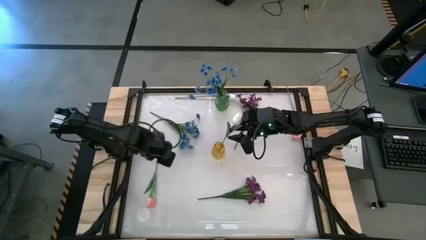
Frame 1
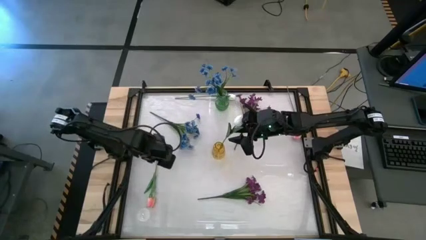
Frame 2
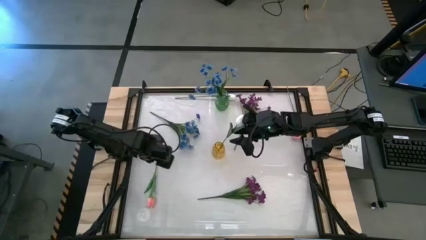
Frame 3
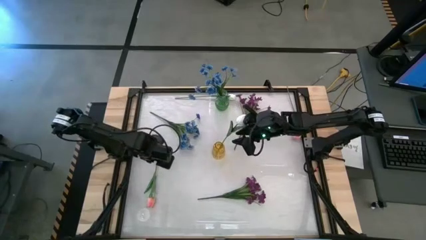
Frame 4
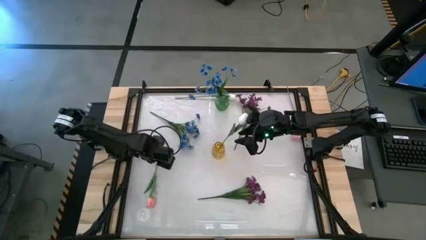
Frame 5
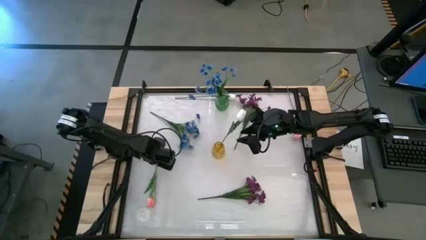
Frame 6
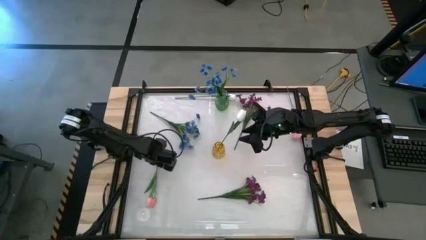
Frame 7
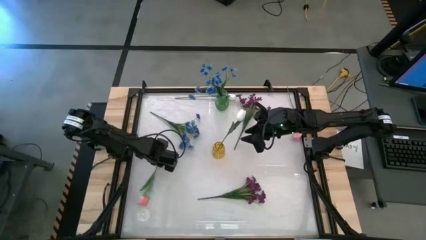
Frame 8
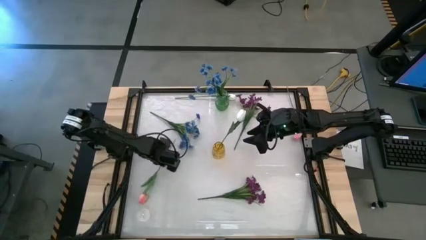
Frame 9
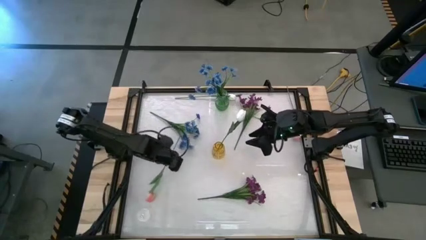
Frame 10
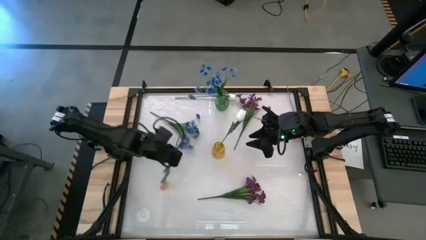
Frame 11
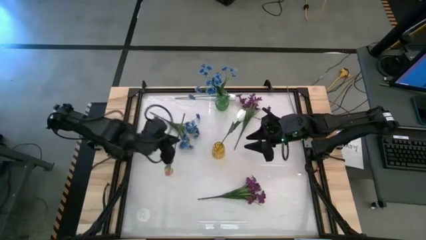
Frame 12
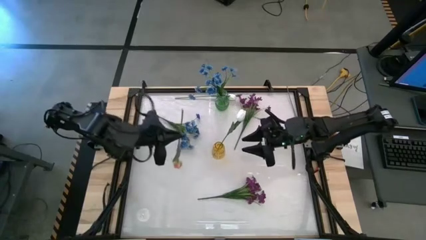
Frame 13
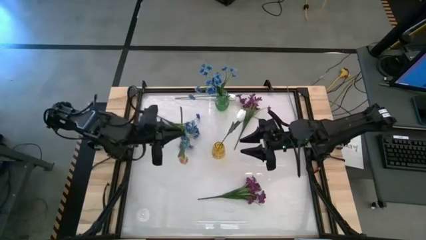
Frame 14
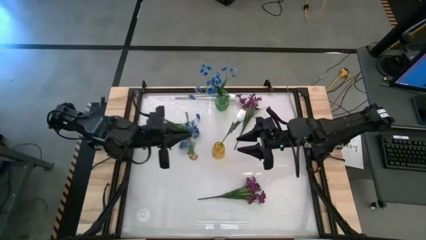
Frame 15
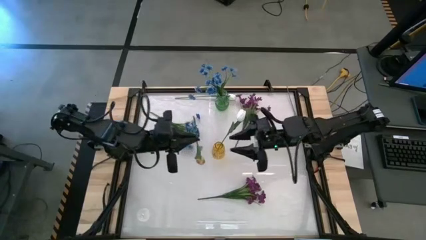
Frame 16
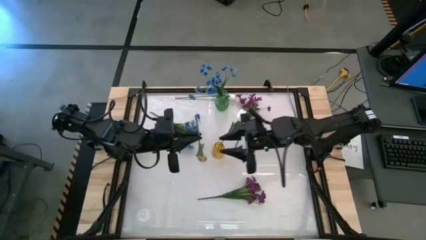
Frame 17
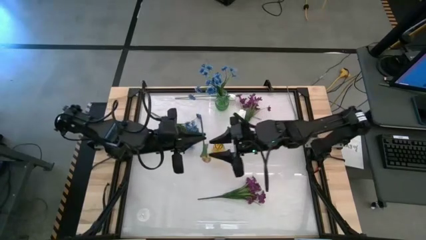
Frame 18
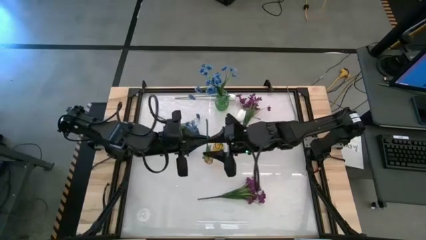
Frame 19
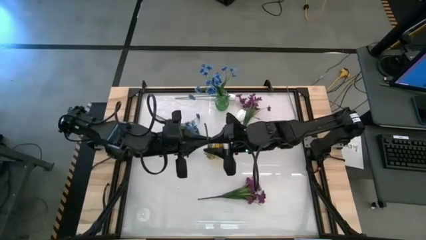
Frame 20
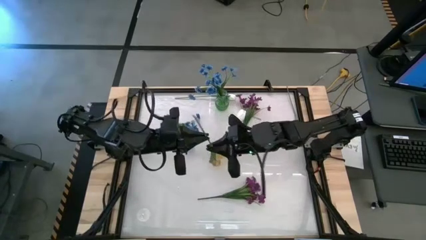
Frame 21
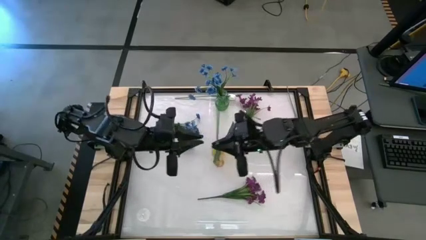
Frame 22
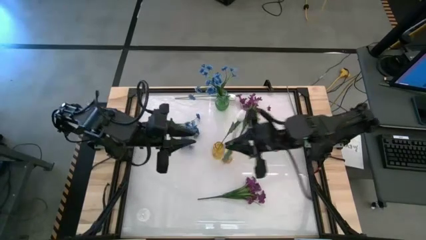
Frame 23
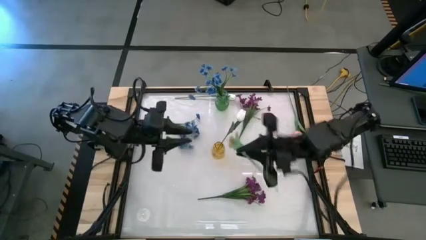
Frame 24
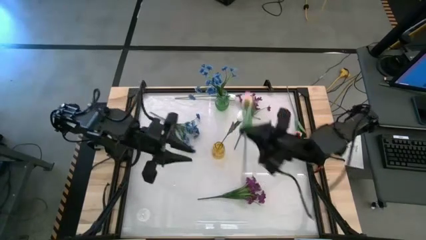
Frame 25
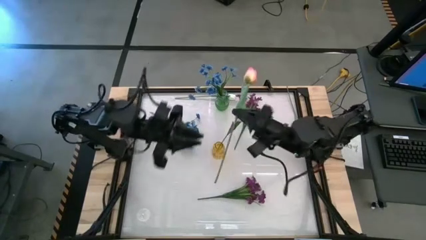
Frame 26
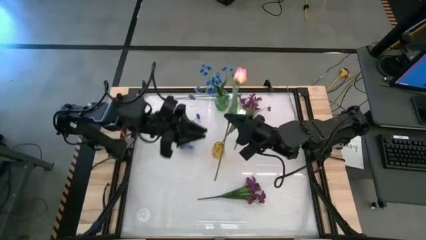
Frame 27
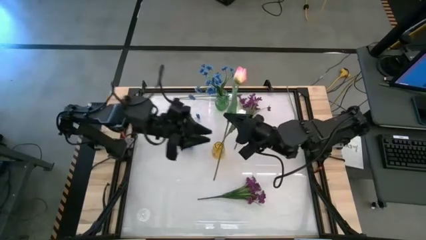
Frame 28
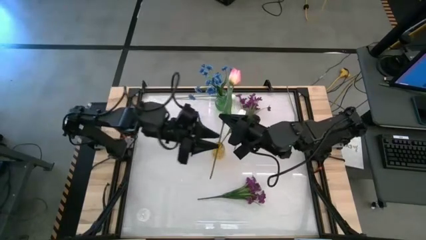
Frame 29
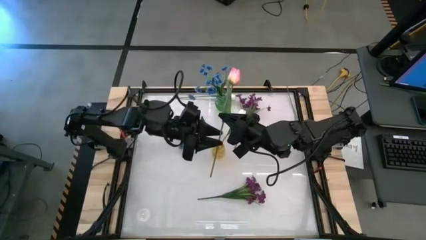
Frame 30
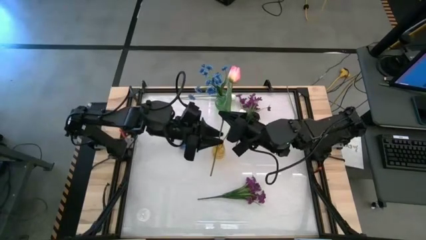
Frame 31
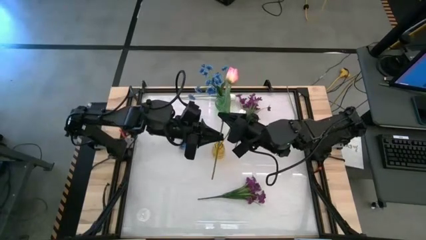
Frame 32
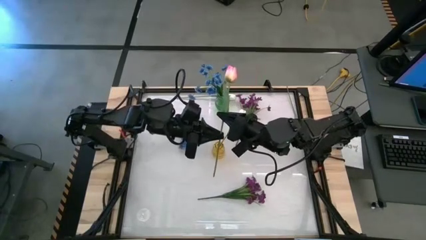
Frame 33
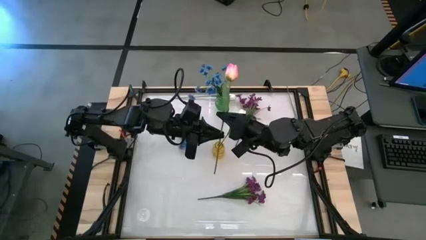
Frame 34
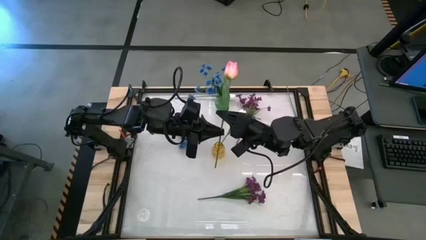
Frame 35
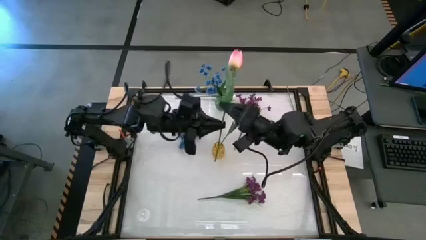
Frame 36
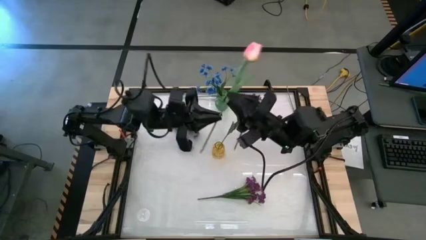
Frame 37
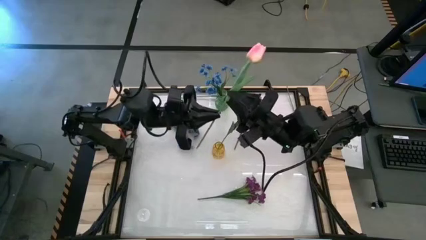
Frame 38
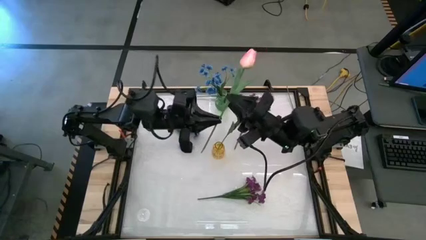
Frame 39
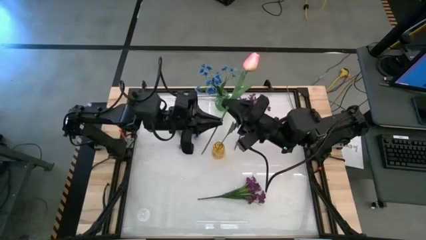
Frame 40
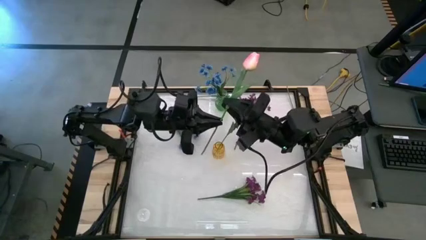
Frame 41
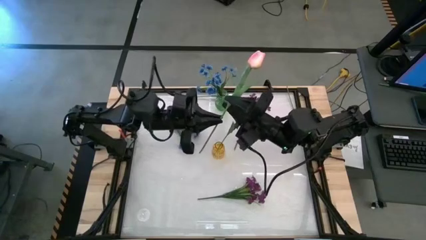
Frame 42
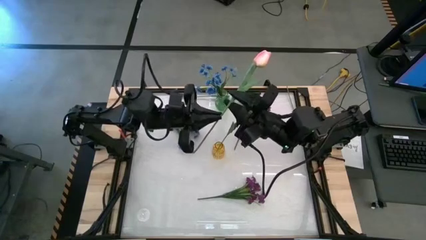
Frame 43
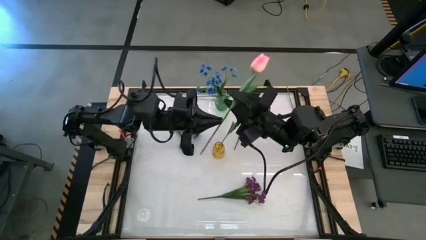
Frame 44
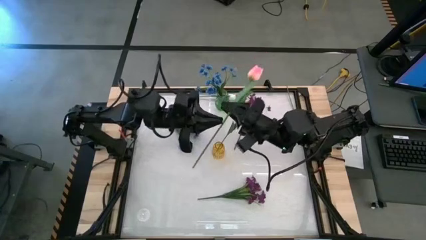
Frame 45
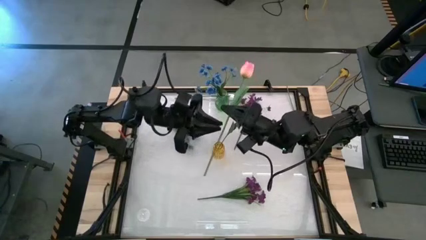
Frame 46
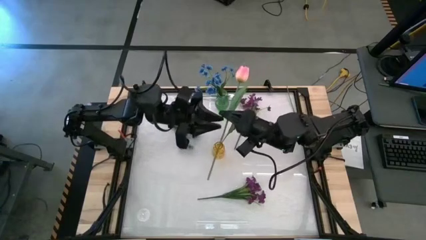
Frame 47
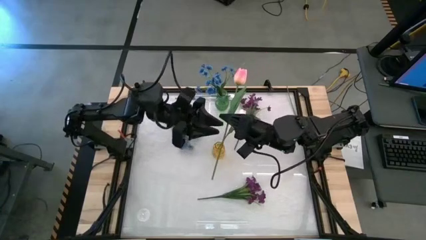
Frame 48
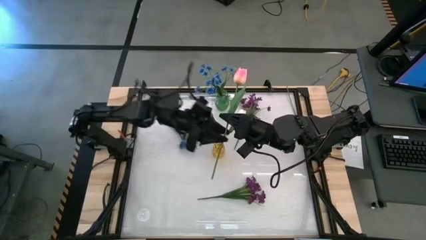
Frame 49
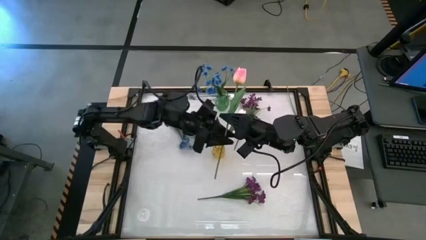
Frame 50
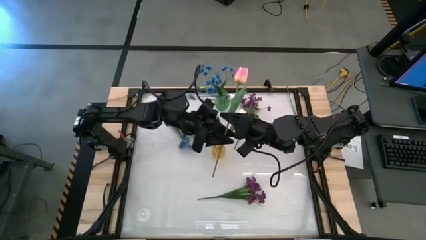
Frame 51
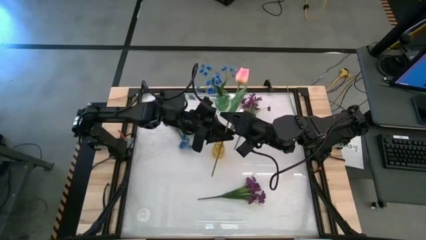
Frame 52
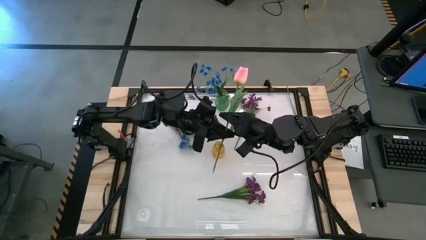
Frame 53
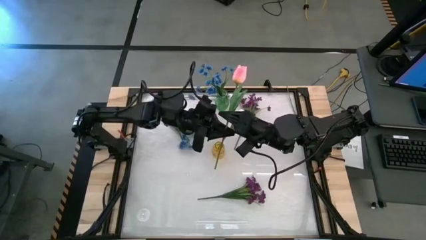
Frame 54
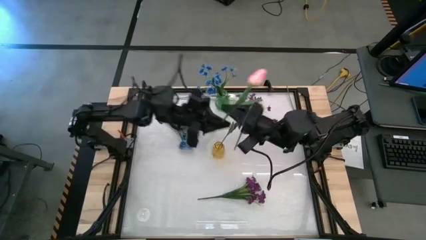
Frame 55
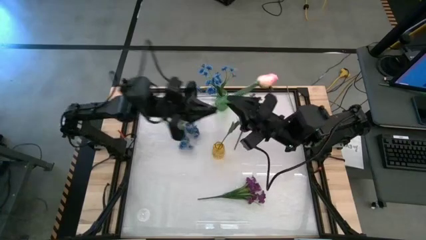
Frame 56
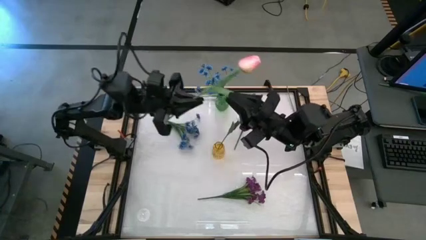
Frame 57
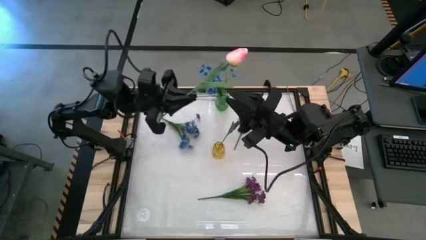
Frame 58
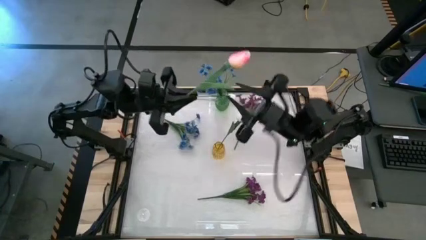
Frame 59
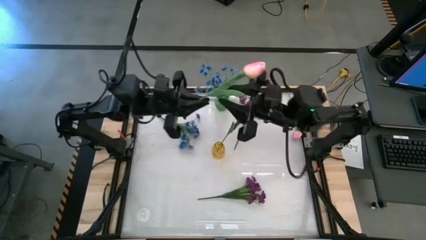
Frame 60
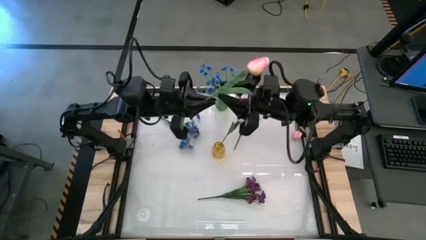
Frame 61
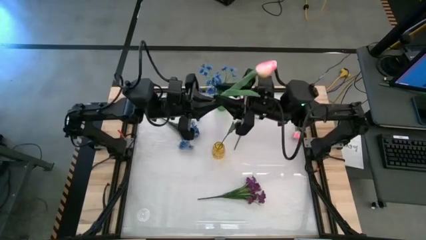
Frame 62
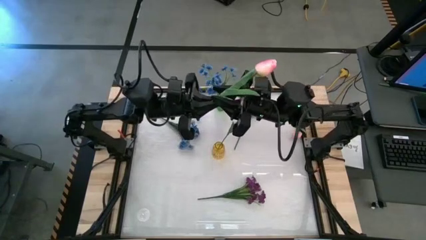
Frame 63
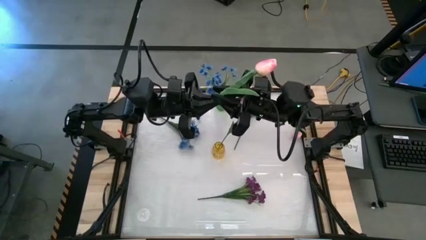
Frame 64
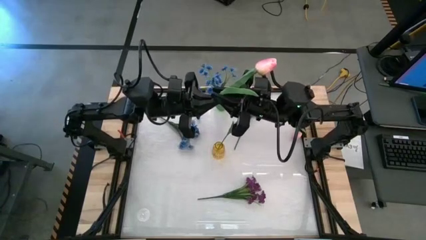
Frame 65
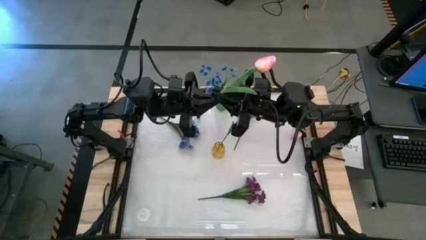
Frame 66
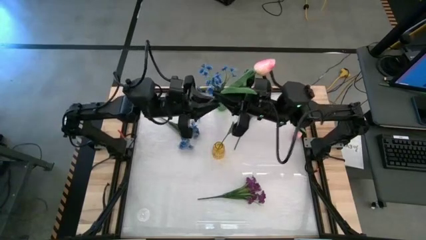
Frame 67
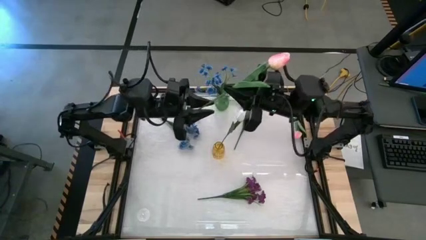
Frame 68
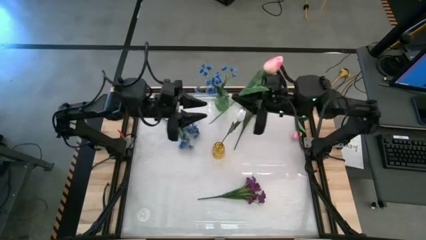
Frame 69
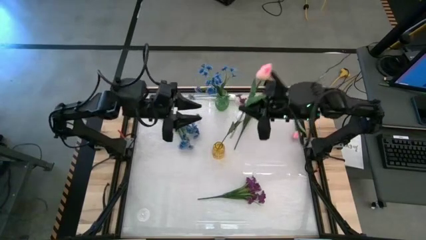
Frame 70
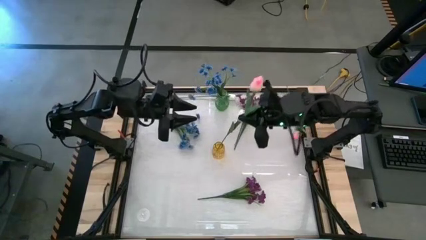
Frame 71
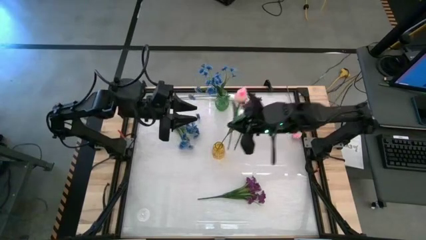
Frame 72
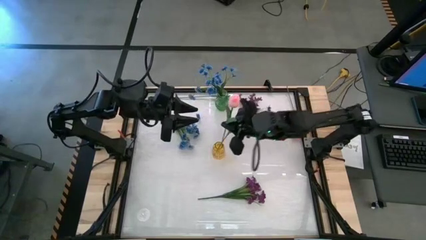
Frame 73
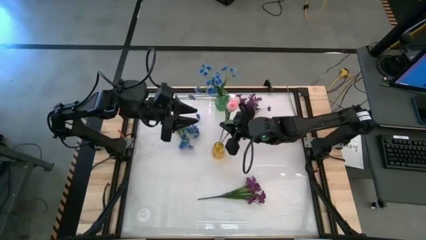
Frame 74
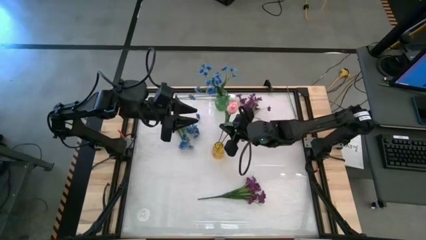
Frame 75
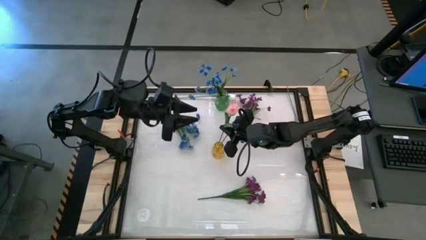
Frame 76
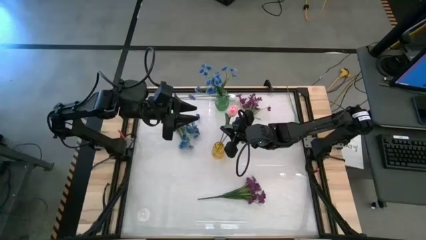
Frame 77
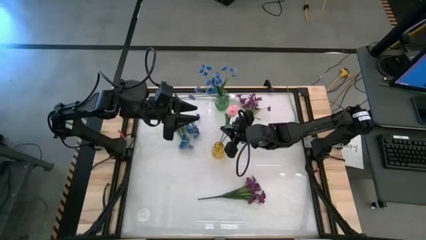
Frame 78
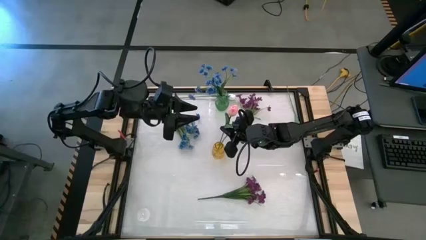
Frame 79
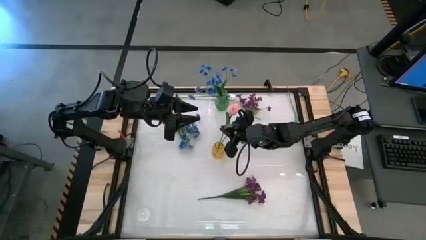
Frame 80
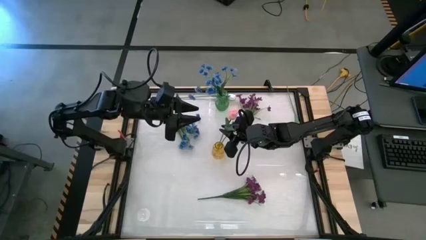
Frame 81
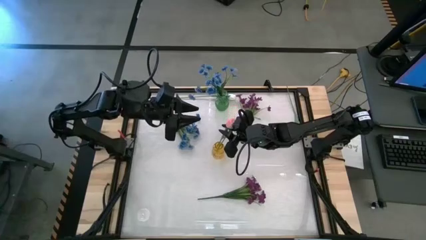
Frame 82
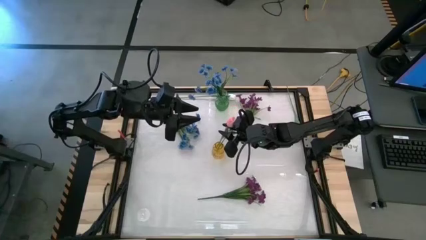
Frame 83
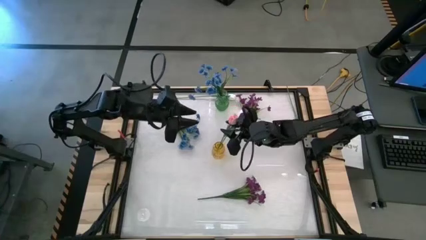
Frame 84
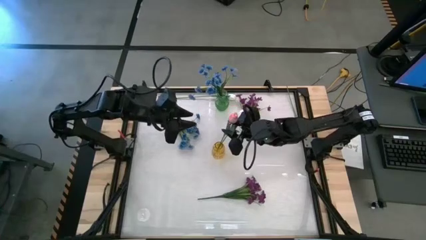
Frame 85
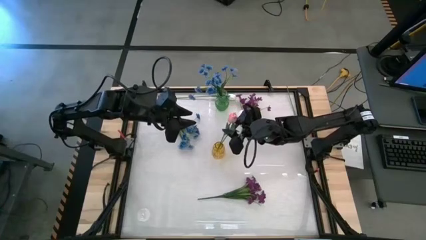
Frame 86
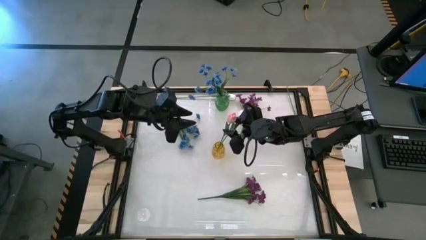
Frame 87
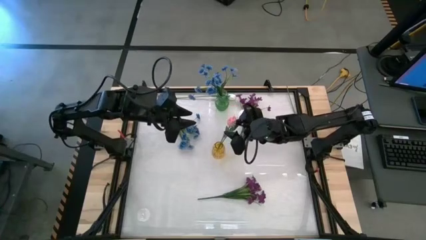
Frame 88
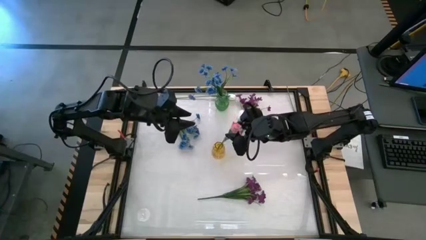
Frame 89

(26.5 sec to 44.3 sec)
Task: Sort flowers into vase by color
Put the left pink flower into the yellow vase
